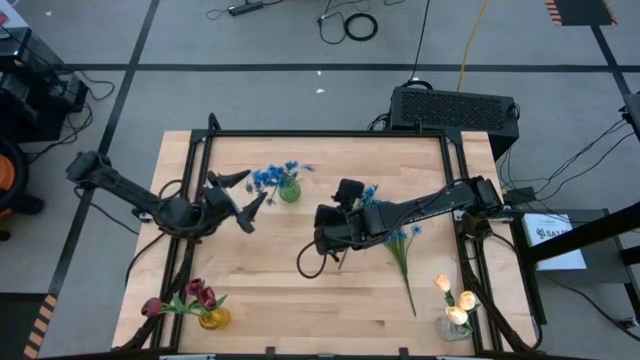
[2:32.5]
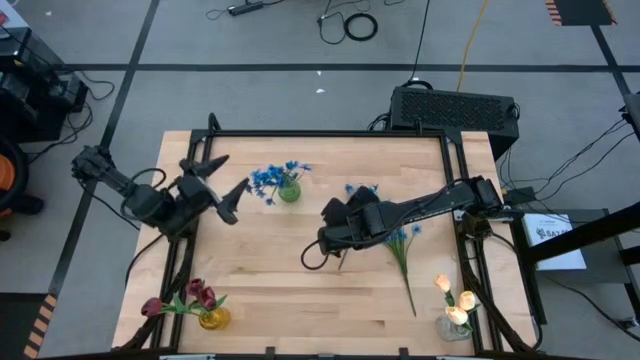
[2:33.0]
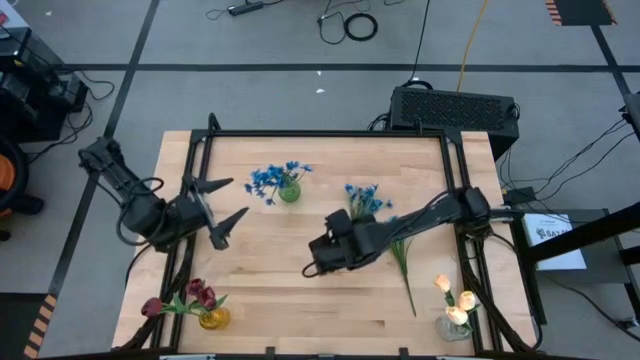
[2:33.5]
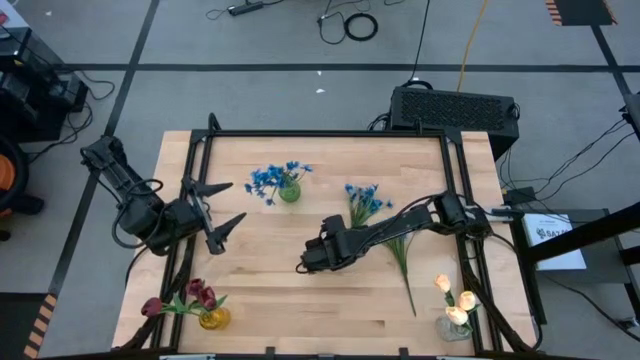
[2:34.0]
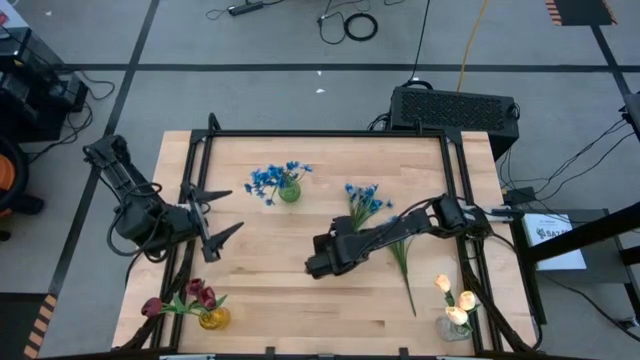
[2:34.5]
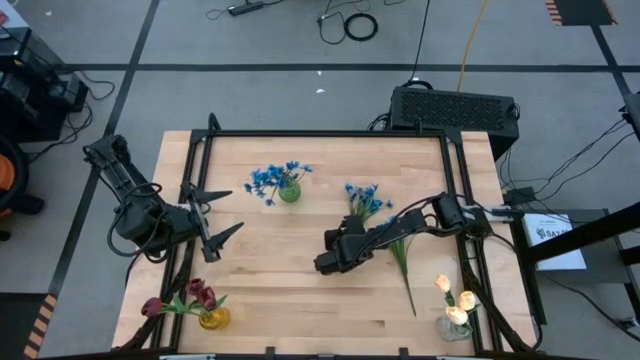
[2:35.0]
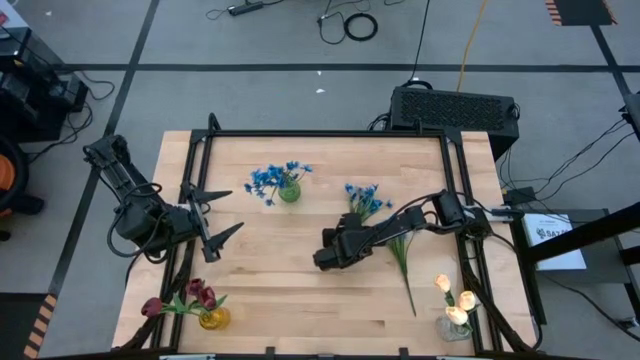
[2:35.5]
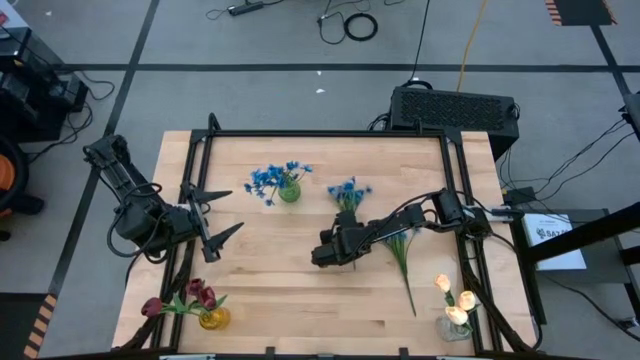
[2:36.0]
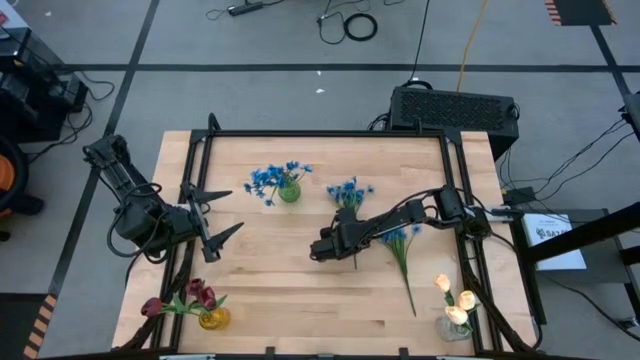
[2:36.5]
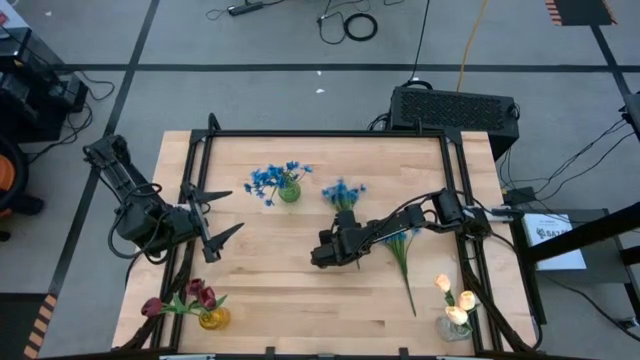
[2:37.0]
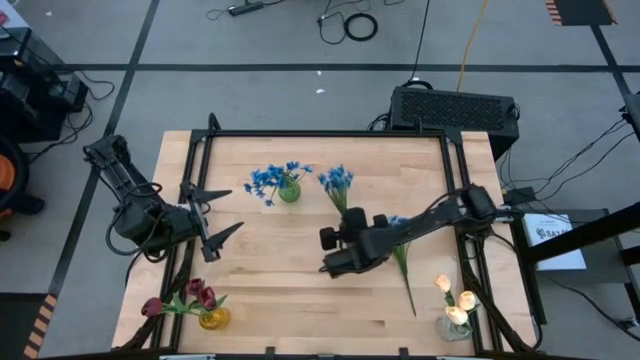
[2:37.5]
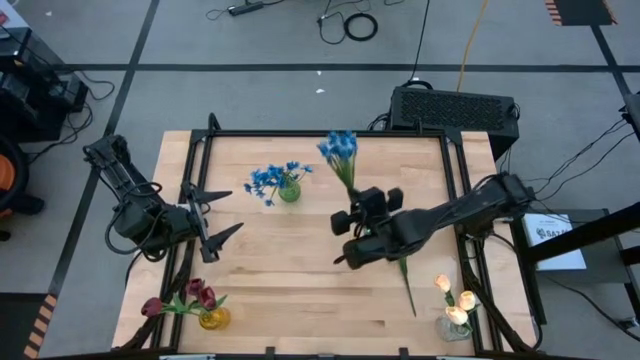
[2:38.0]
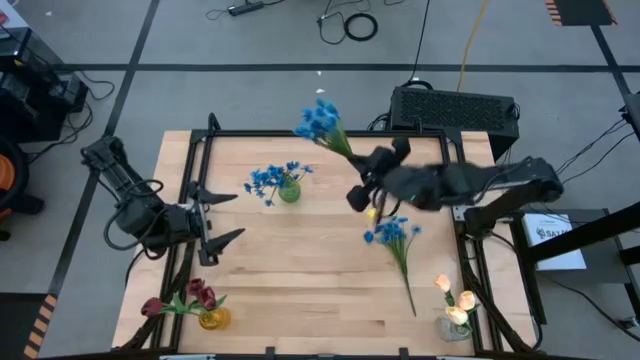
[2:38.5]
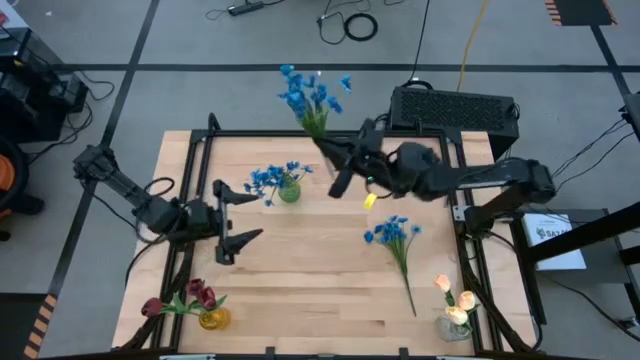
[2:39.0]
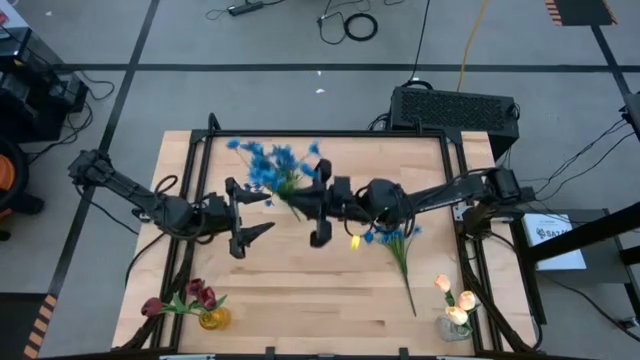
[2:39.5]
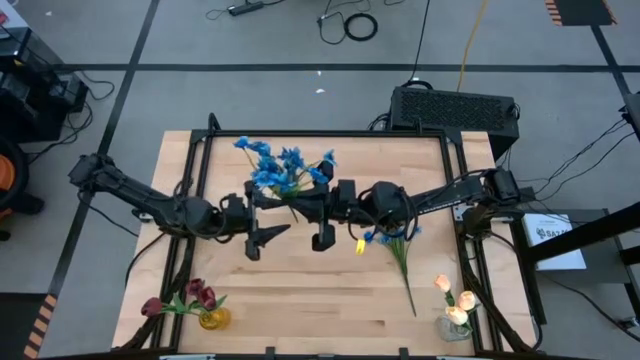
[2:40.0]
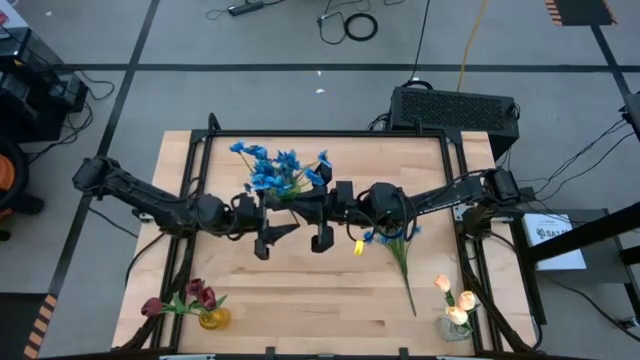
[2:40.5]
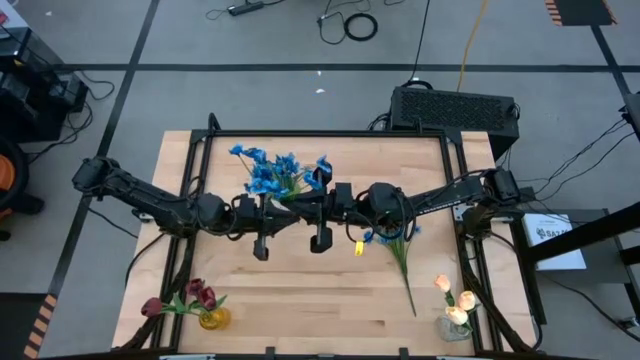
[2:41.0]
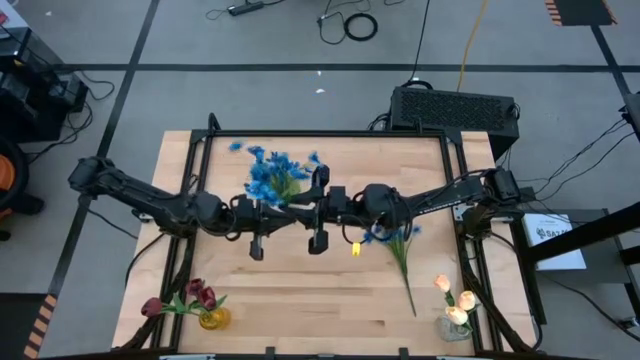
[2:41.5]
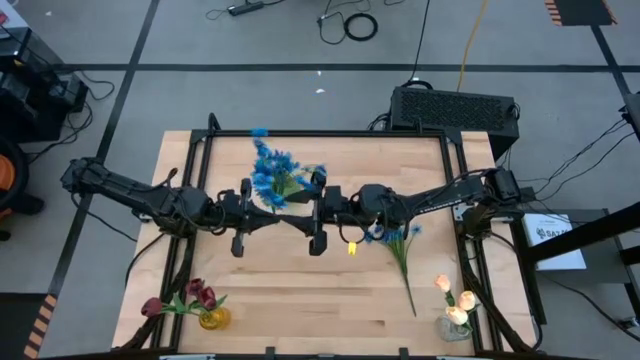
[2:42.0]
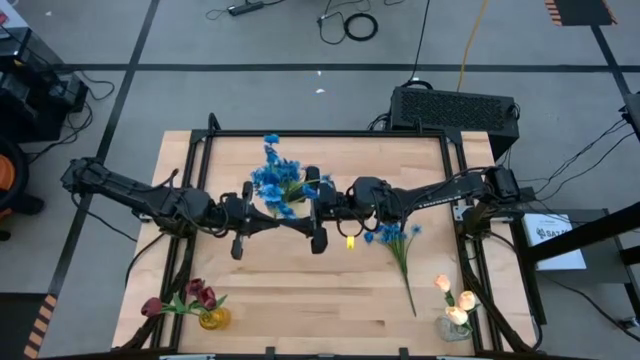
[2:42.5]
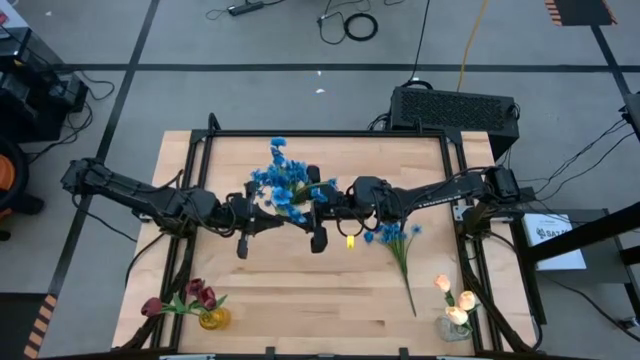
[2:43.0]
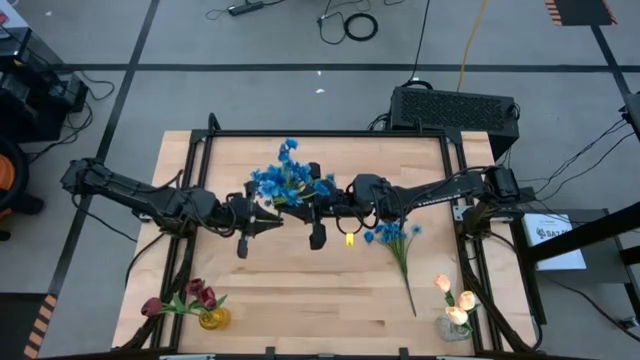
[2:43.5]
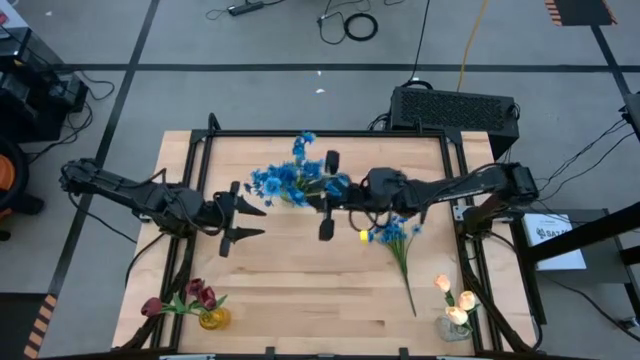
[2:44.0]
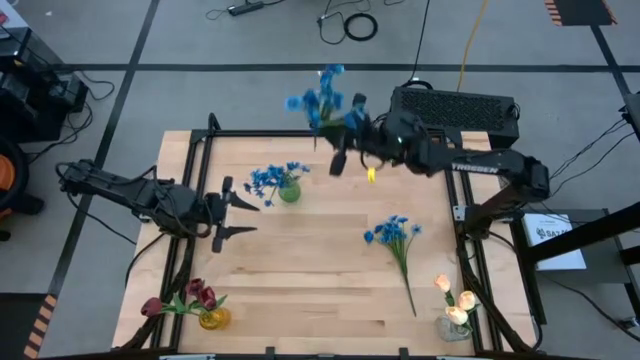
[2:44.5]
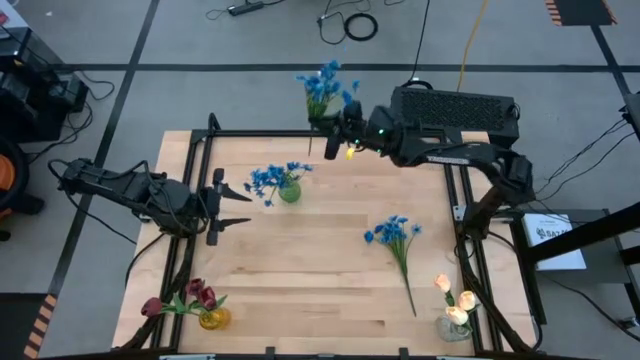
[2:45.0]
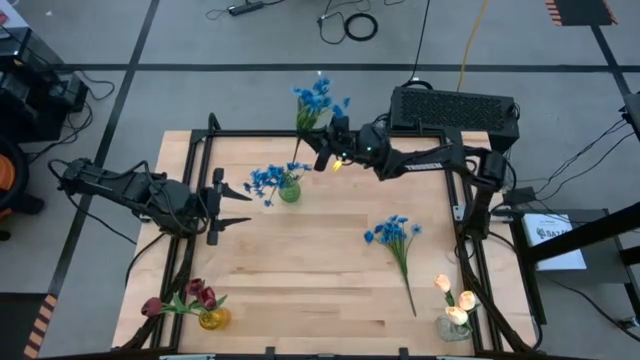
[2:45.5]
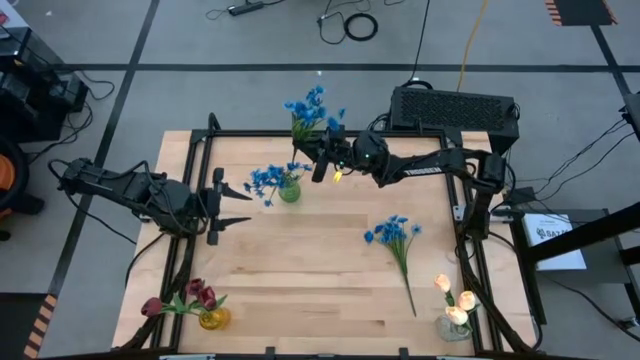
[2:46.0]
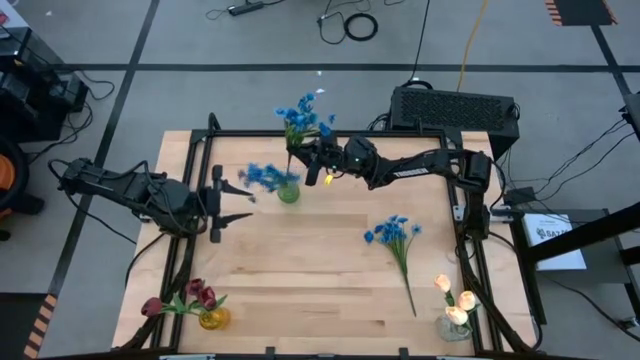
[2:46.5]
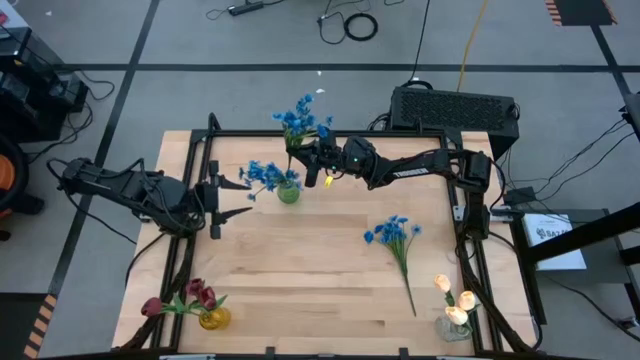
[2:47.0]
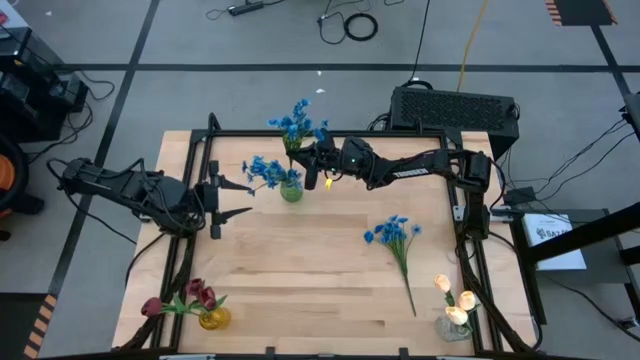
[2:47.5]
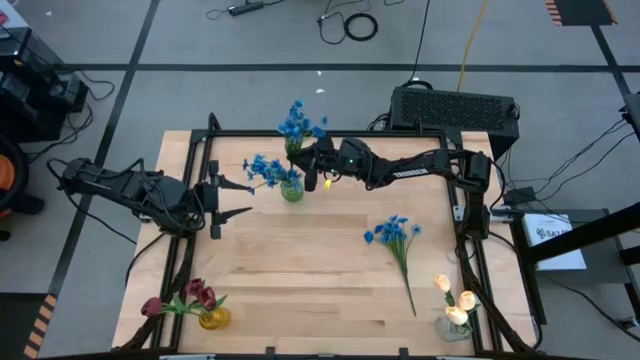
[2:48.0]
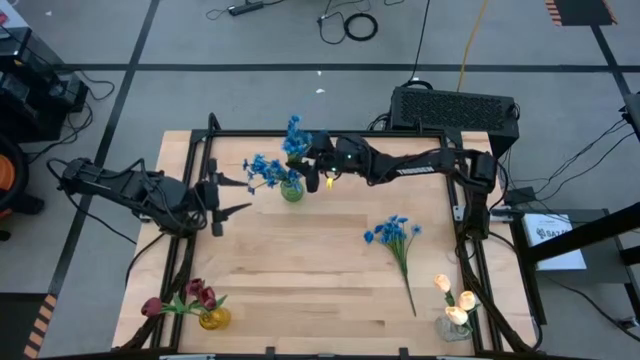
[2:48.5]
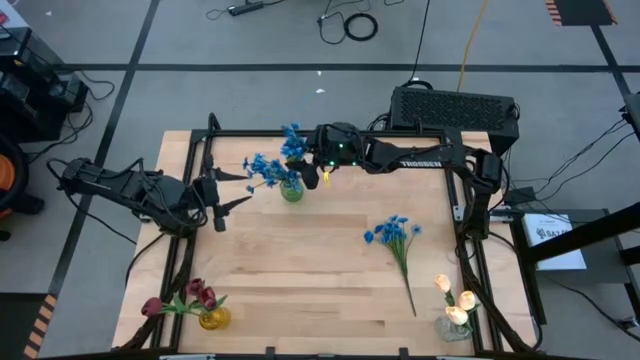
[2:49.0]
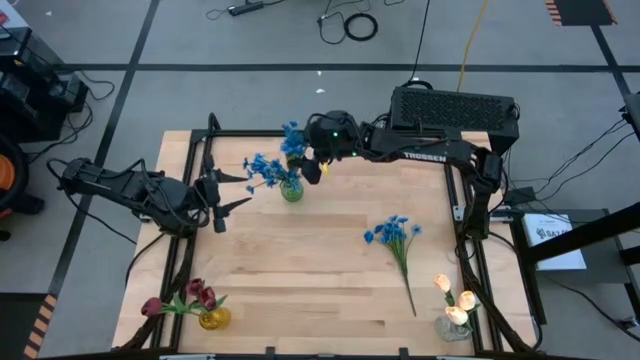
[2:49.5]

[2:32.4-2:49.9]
Task: Sort flowers into vase by color
Put the top blue flowers into the green vase

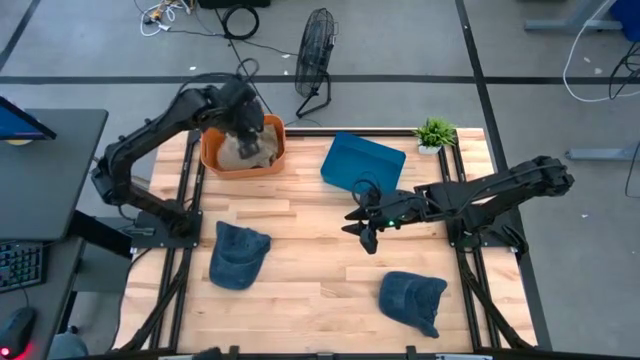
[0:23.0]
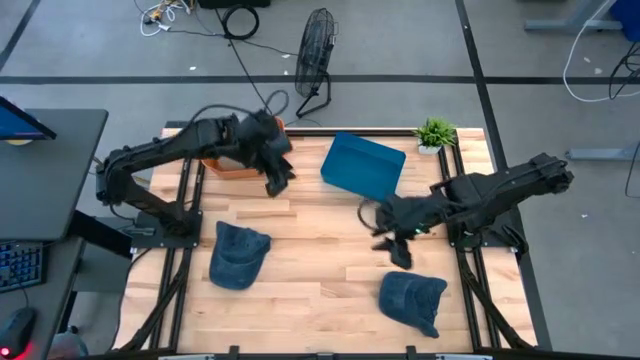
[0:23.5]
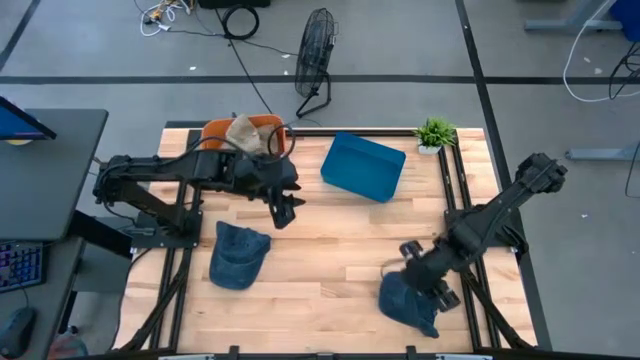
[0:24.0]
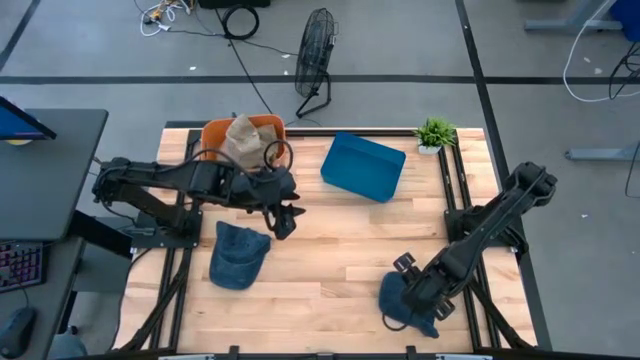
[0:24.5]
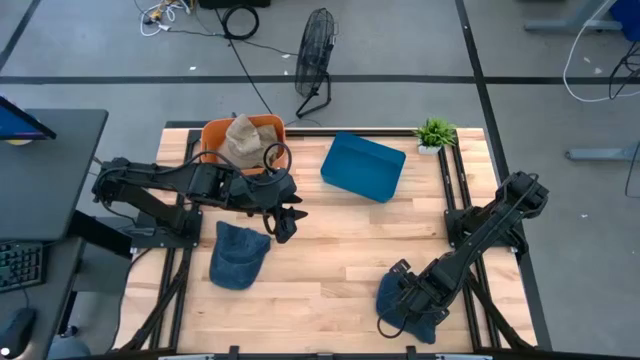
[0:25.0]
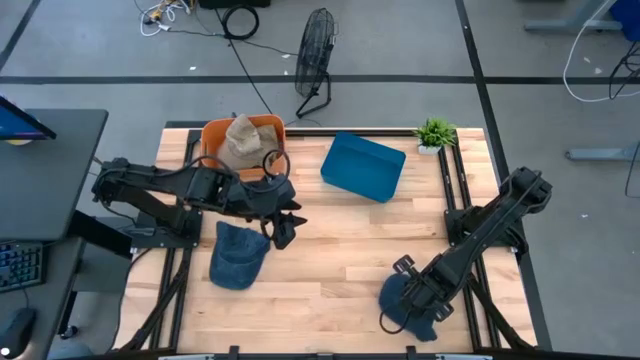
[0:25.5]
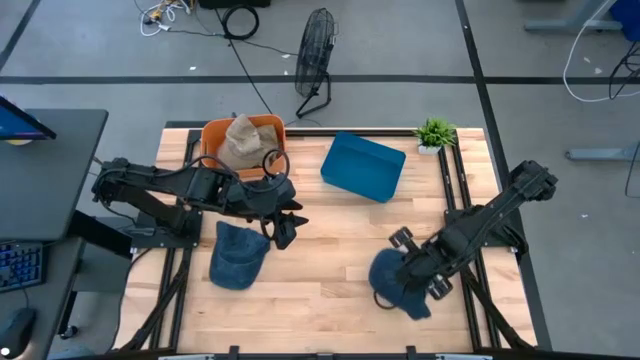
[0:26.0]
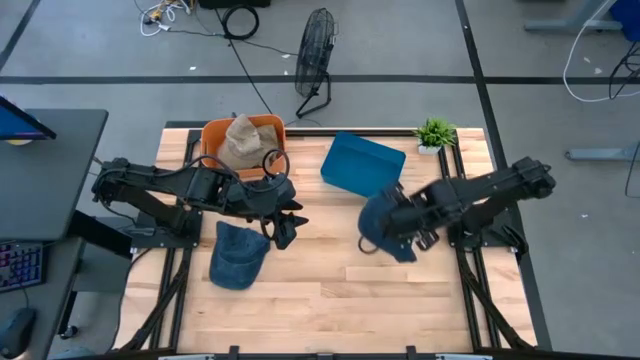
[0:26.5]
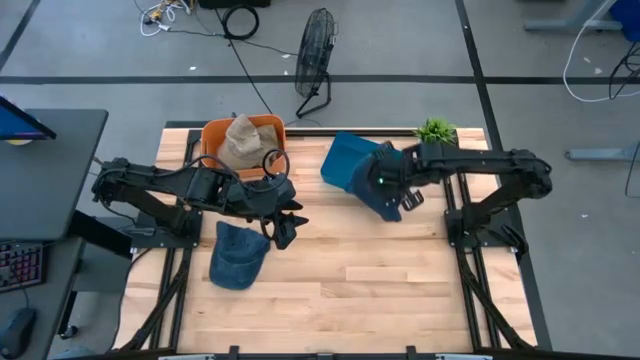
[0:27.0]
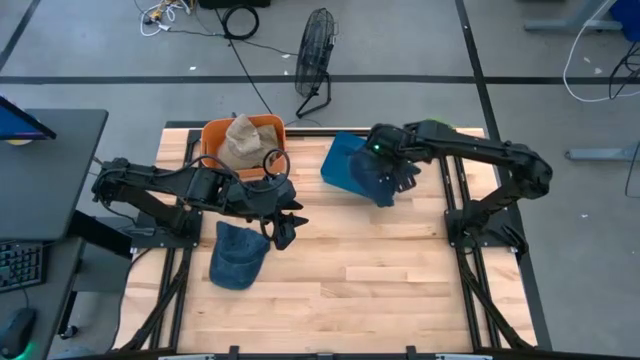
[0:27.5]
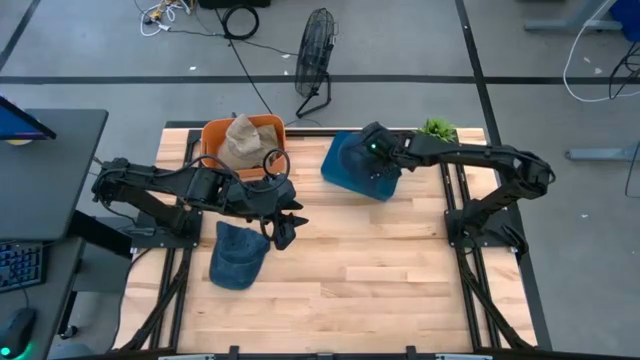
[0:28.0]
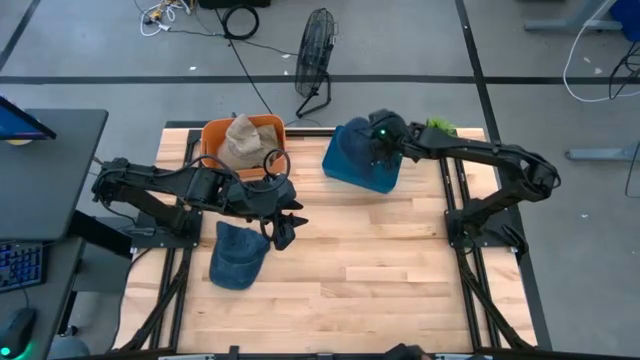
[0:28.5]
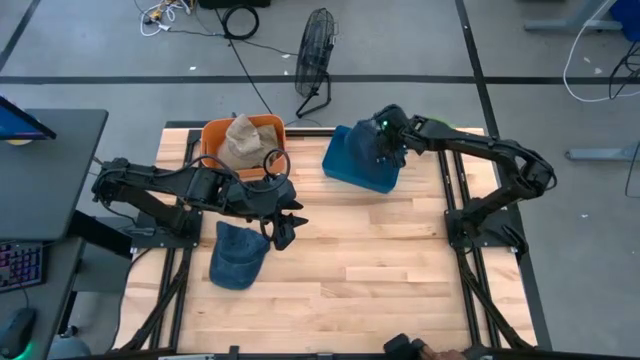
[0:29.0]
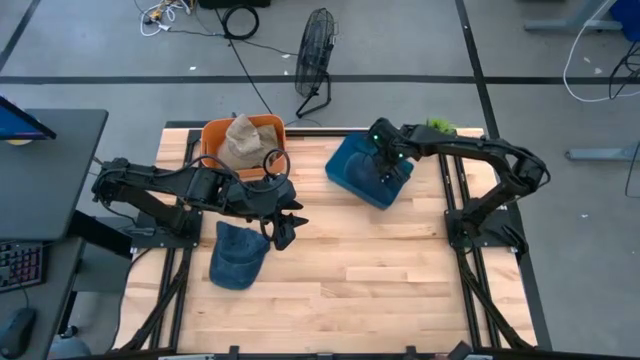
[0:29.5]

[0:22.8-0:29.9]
Task: Pick & Place hat
Put the bottom blue cap into the blue bin
